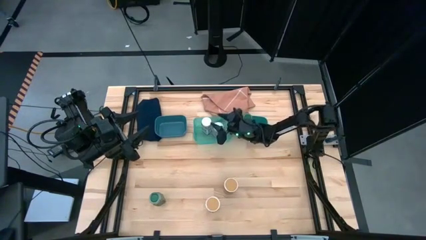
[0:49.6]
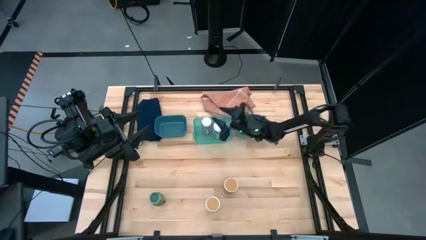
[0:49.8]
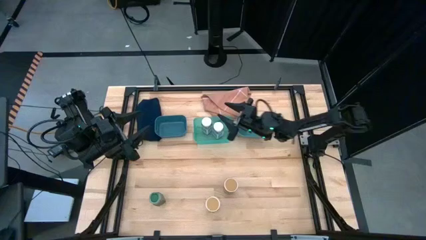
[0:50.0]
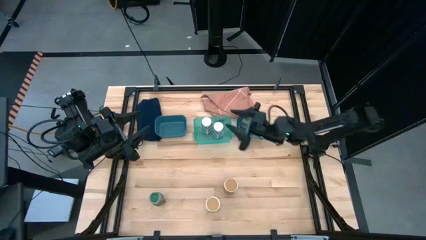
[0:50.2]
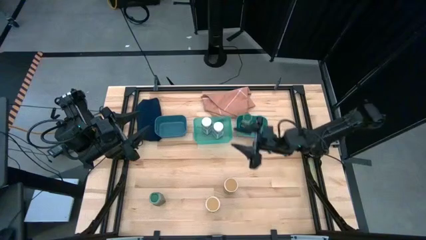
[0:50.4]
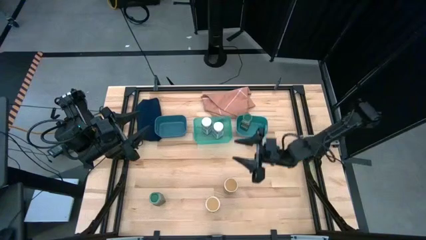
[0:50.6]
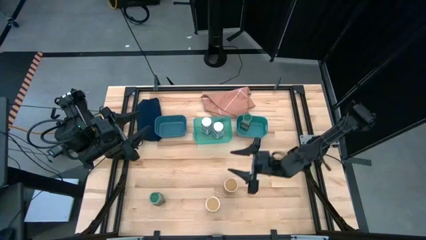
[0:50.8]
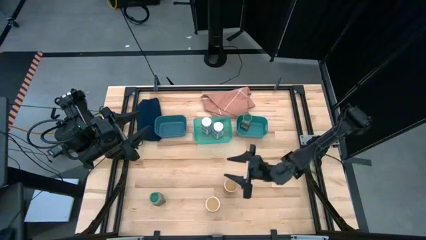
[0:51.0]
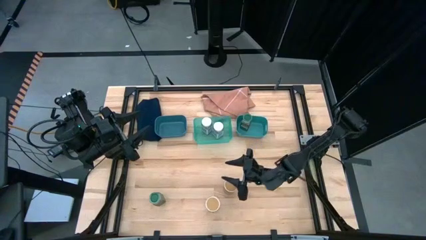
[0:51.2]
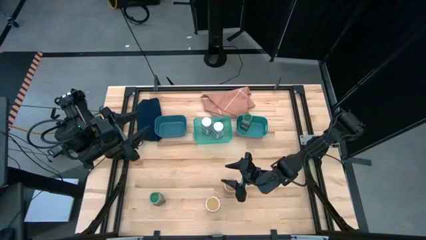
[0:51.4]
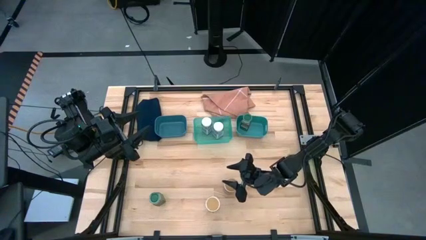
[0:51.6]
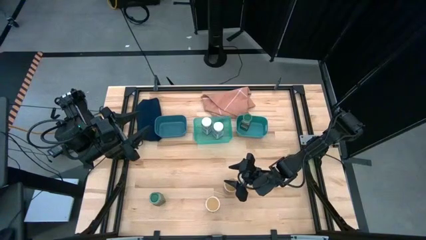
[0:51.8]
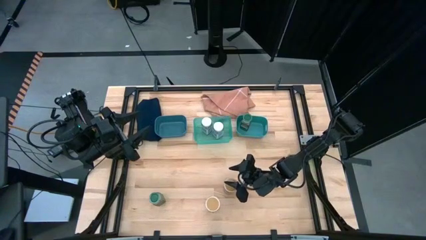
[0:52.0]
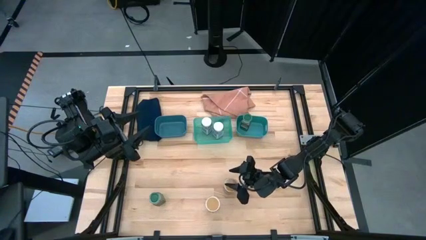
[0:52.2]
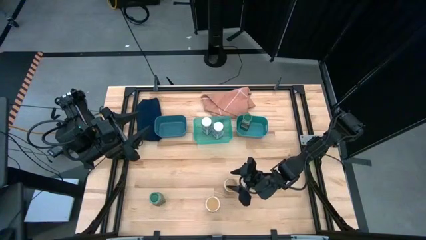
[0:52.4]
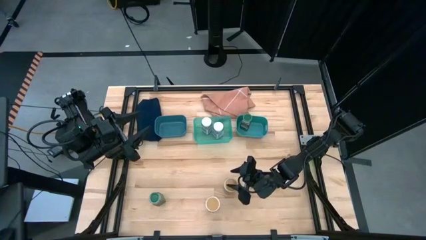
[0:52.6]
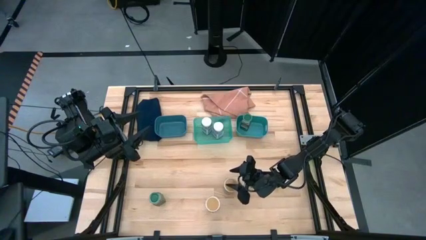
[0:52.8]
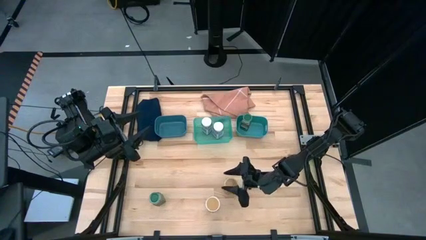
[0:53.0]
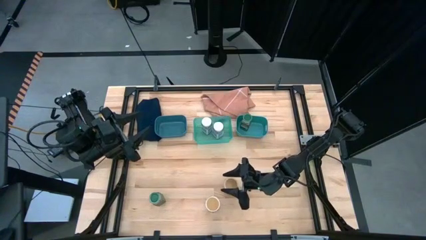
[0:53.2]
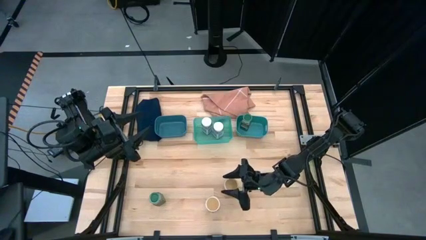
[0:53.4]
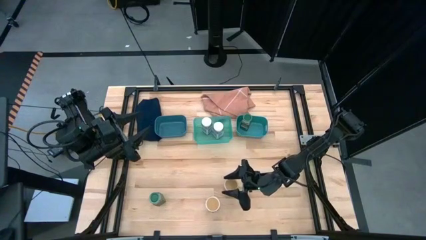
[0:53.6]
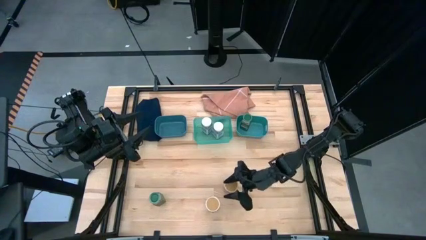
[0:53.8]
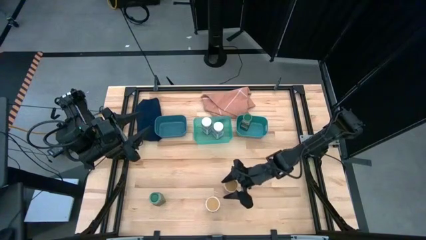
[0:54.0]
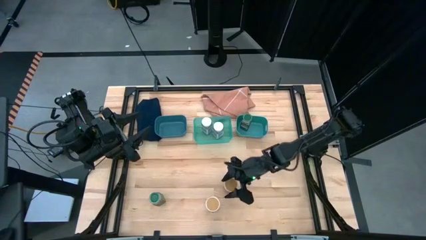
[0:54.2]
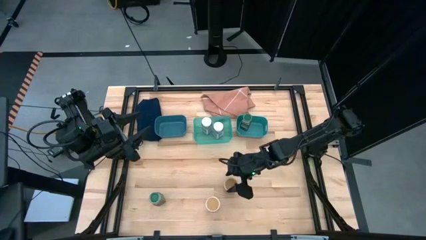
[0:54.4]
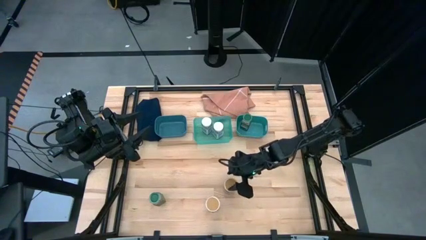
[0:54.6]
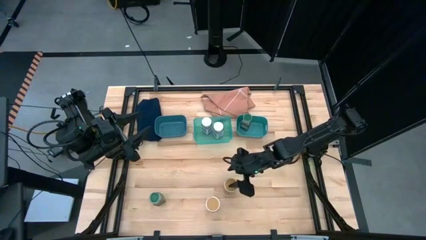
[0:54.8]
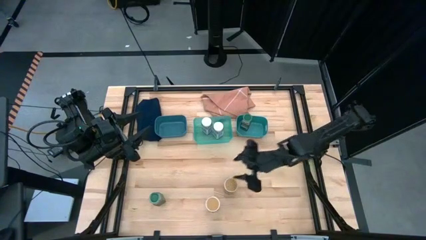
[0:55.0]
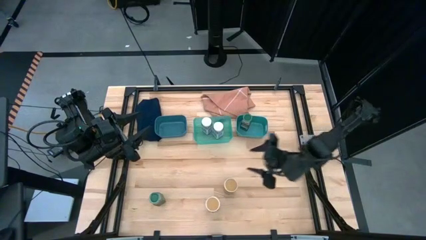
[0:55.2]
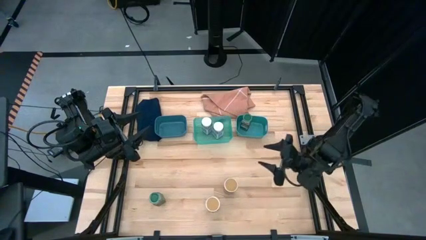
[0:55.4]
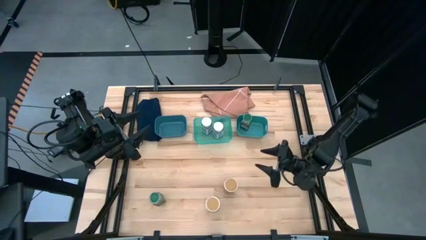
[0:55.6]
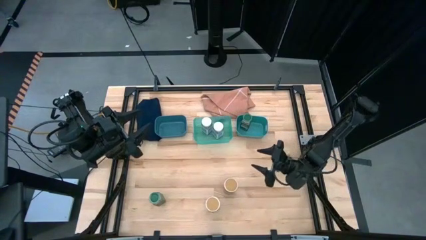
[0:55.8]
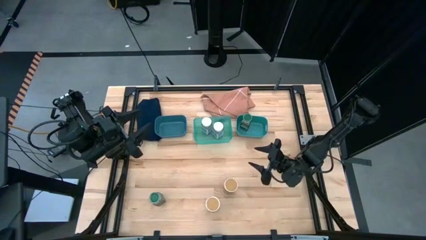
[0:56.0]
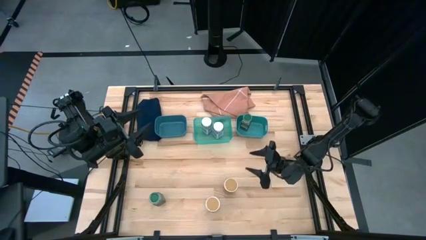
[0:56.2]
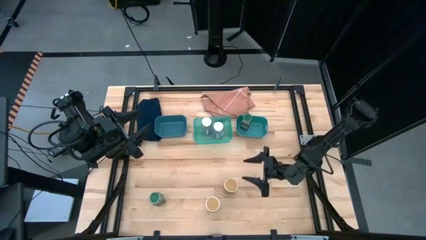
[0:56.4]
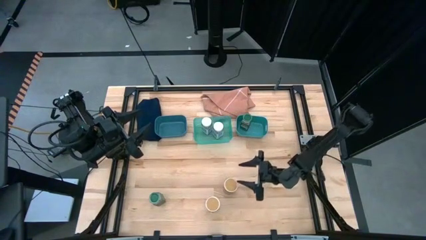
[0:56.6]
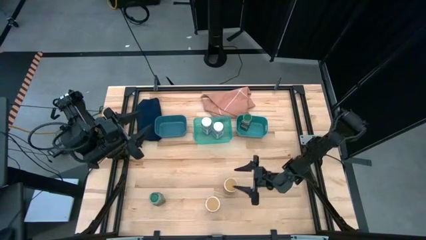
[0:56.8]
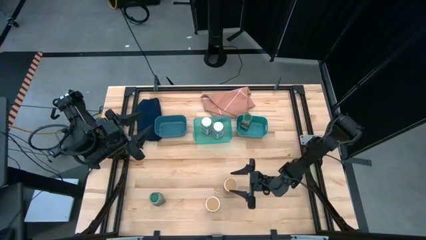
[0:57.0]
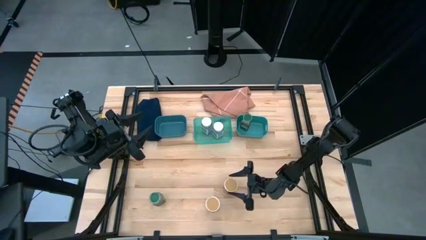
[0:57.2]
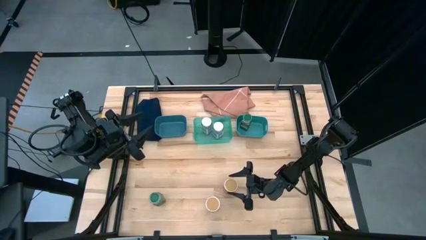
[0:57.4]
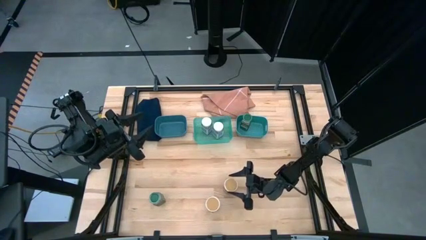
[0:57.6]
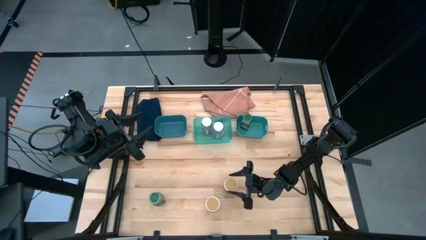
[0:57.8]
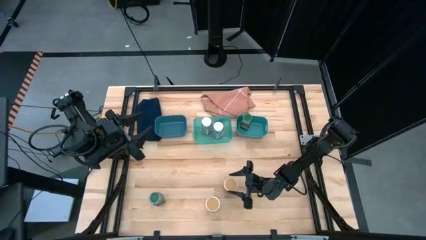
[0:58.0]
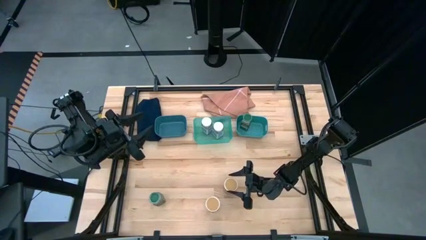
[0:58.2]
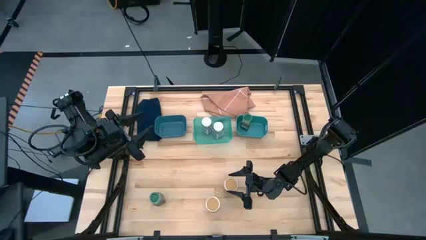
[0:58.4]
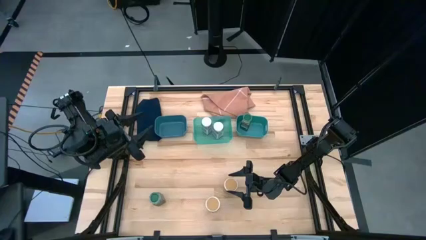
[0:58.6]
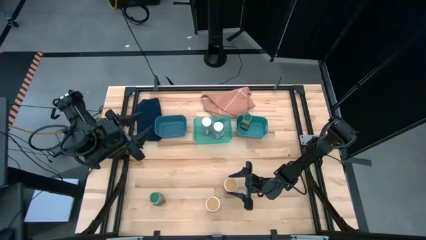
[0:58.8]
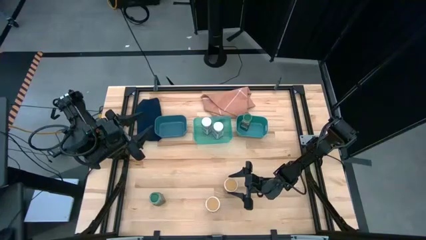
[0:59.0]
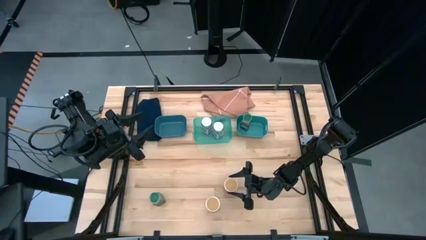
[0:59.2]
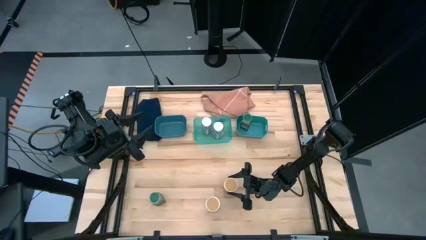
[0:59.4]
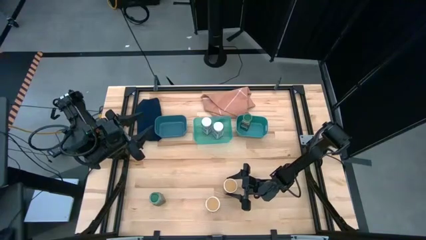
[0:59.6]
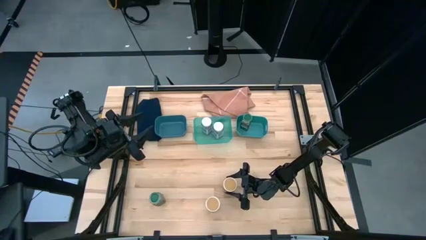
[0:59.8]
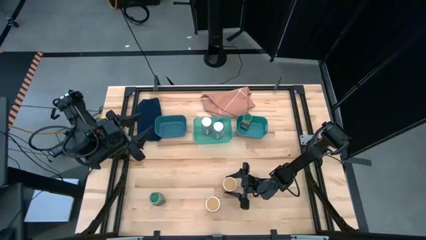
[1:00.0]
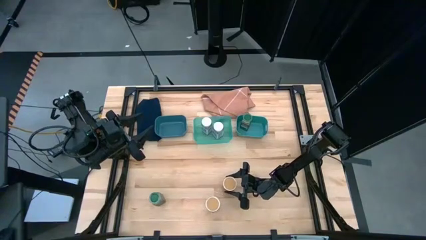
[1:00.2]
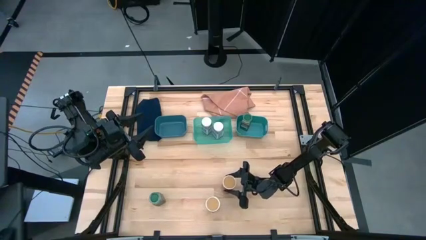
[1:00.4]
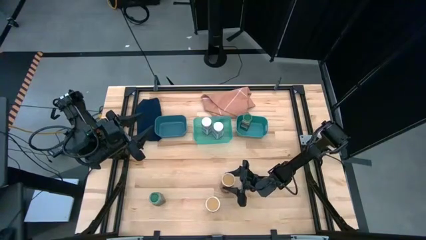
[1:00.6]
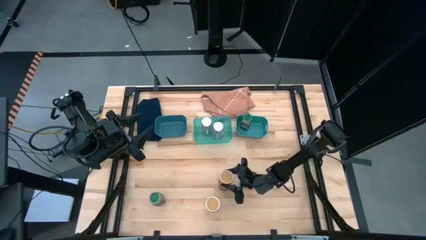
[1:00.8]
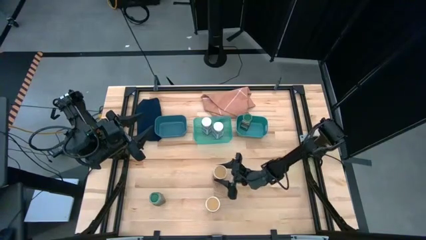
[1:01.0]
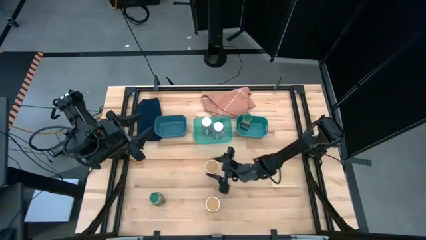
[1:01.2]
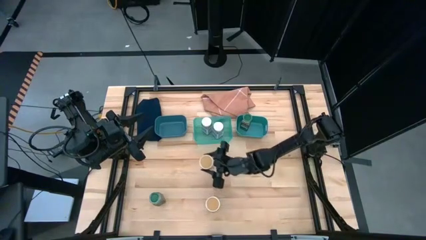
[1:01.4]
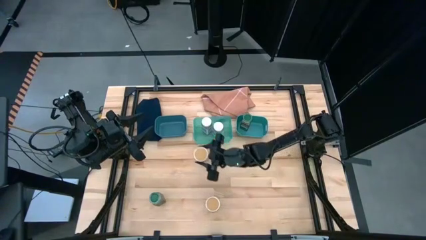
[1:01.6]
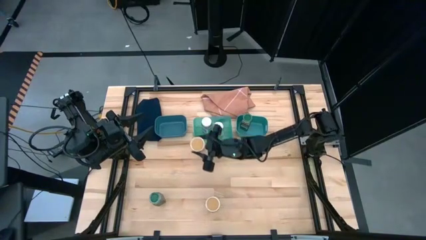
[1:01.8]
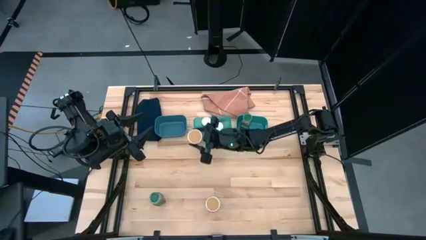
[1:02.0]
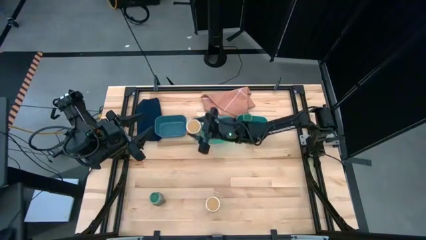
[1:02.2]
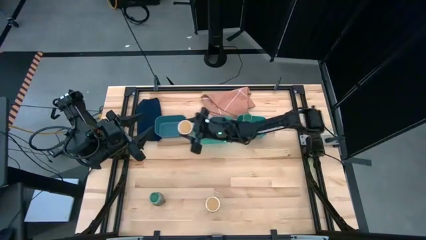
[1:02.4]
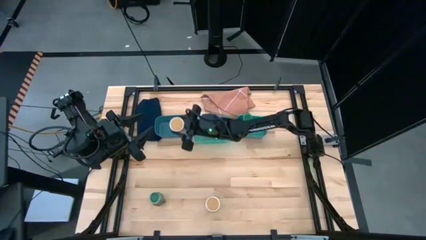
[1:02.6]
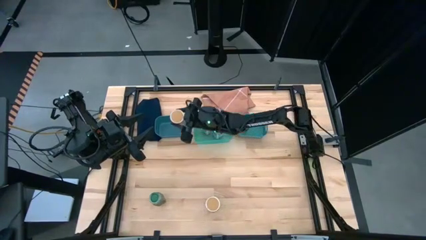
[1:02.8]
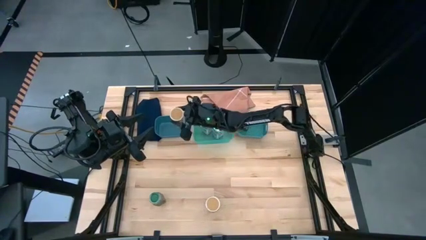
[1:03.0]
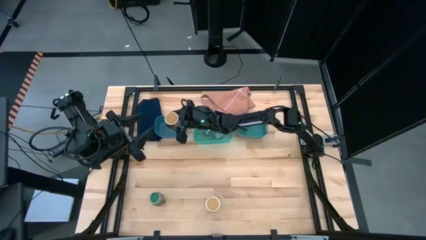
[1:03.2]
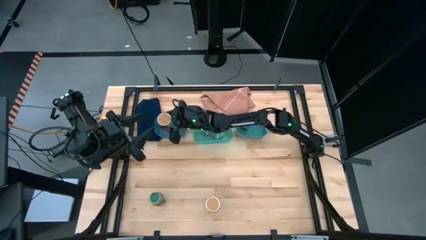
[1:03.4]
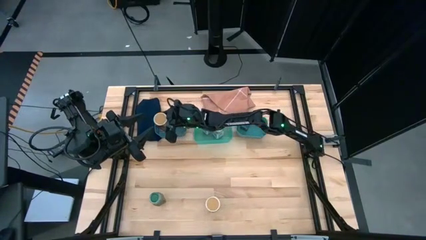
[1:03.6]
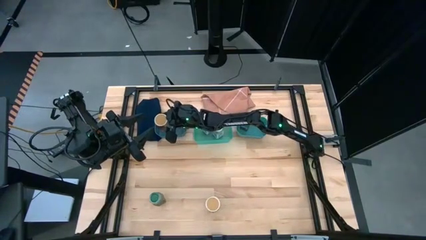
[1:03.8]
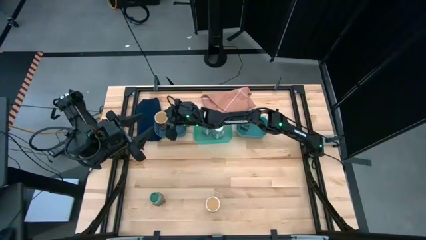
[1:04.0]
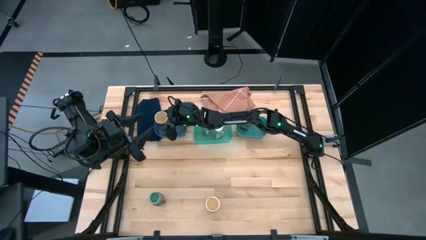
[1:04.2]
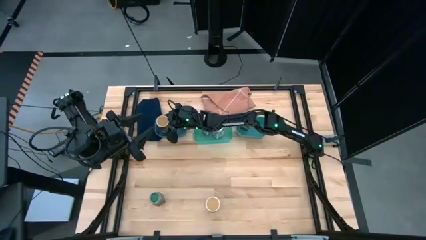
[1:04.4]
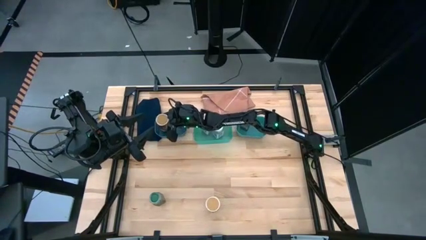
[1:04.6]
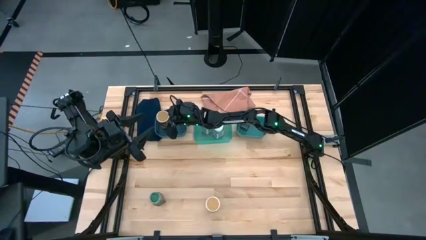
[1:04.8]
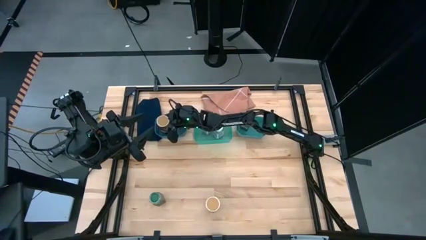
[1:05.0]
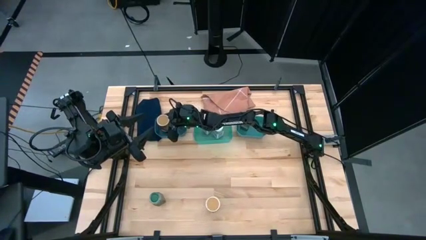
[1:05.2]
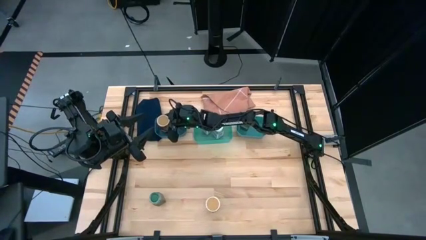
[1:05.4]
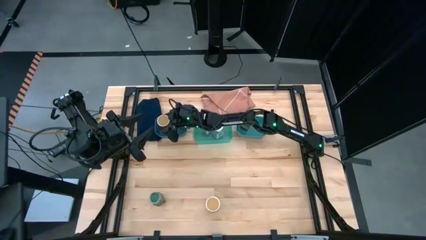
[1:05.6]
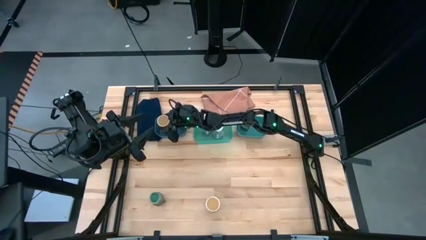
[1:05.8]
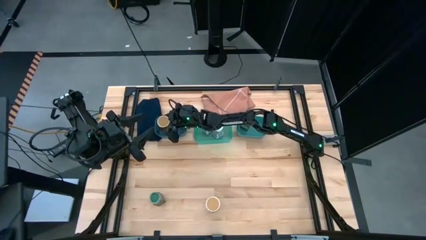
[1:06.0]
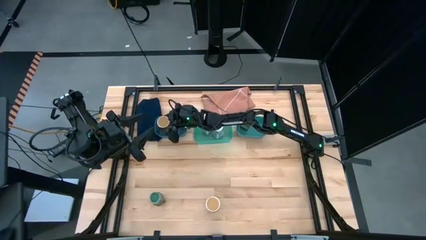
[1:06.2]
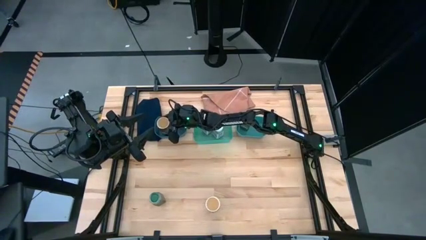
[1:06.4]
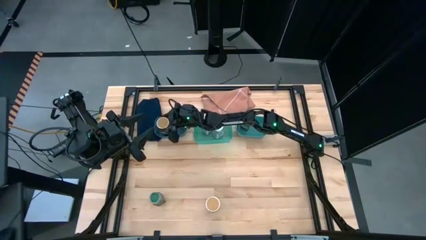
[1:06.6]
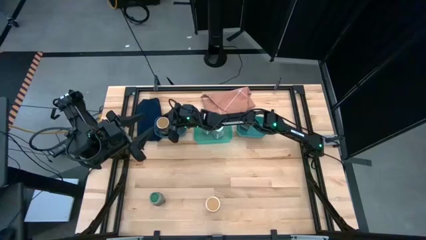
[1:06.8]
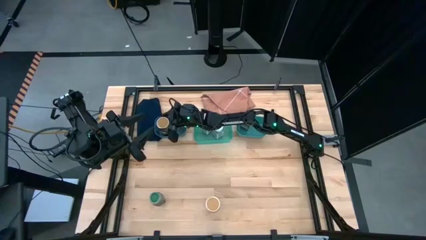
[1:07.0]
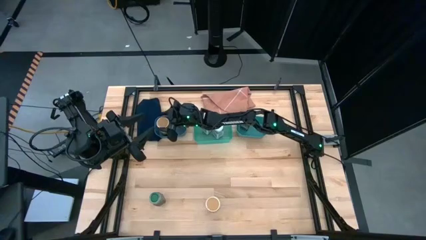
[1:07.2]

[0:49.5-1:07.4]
Task: Sort spices by type
Put the top gold seasoning bottle into the blue bin
